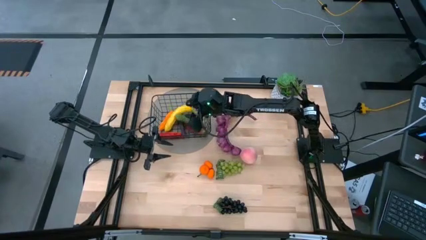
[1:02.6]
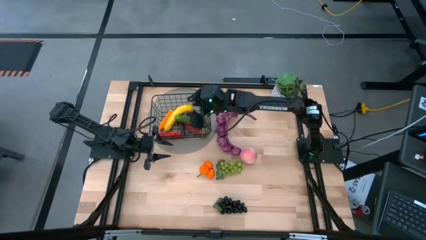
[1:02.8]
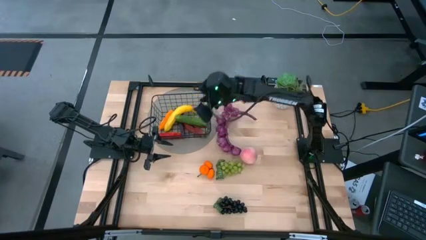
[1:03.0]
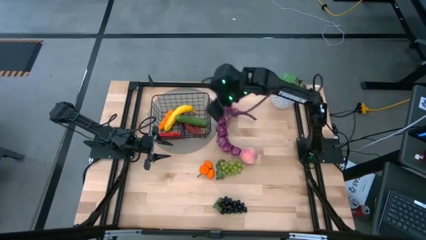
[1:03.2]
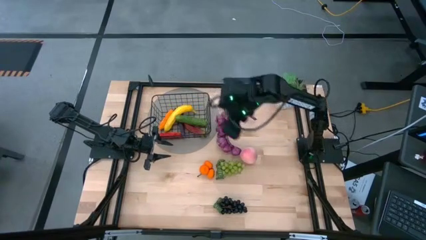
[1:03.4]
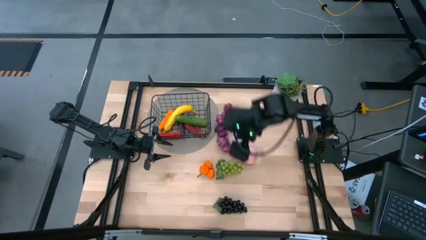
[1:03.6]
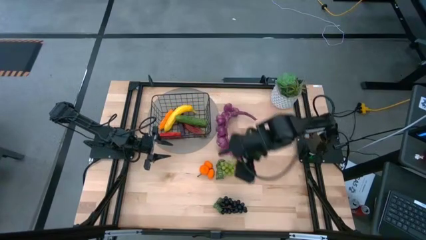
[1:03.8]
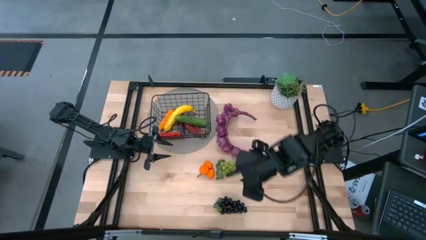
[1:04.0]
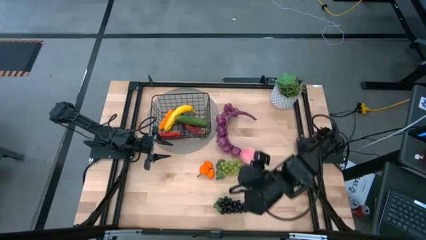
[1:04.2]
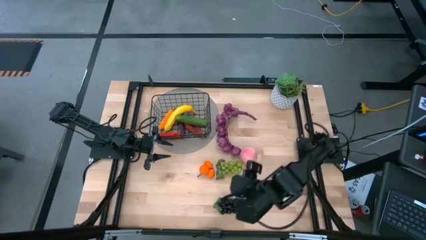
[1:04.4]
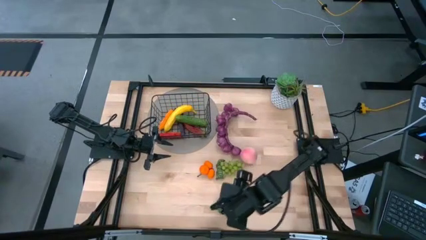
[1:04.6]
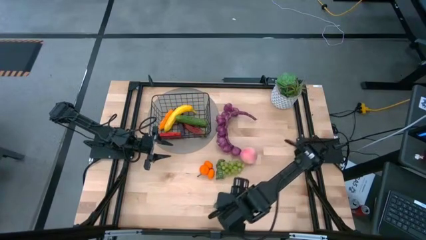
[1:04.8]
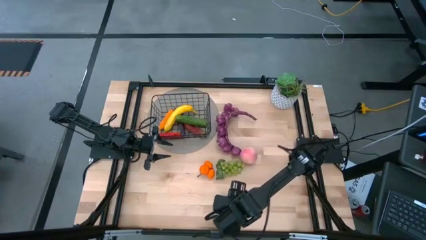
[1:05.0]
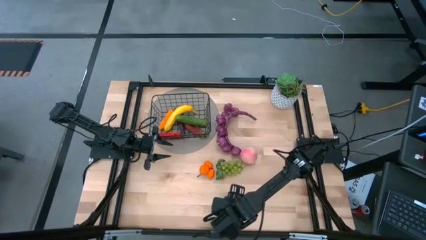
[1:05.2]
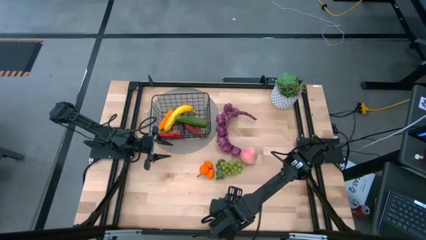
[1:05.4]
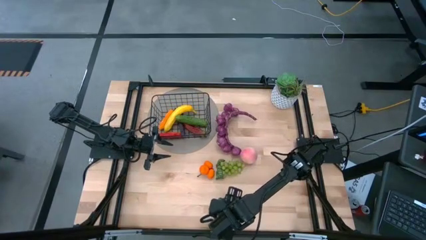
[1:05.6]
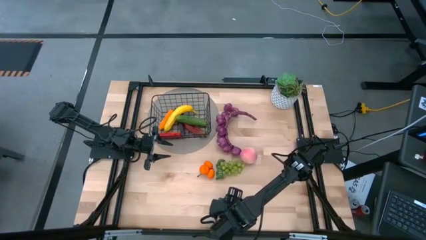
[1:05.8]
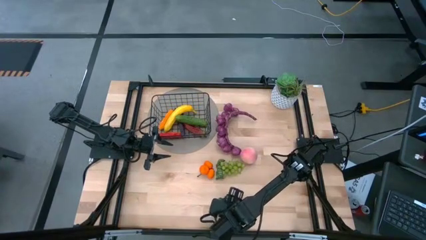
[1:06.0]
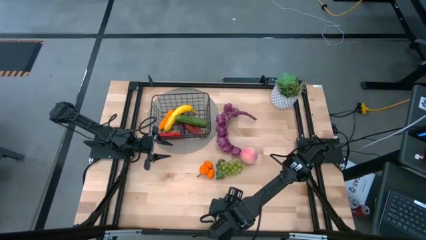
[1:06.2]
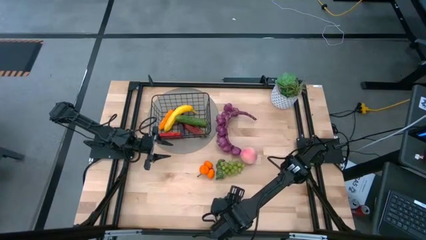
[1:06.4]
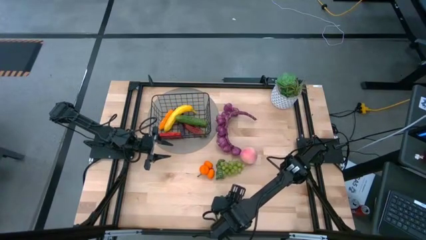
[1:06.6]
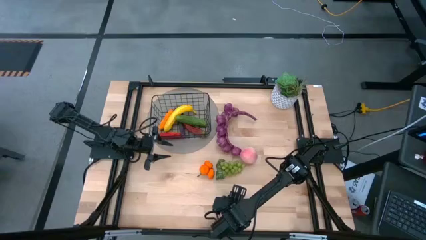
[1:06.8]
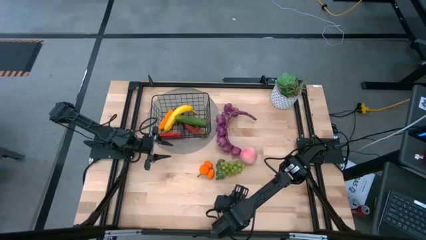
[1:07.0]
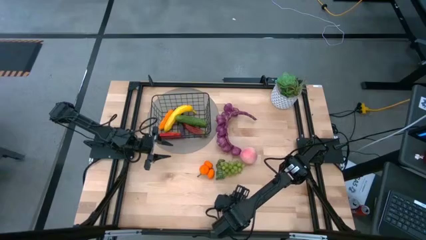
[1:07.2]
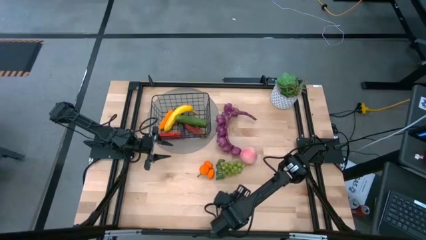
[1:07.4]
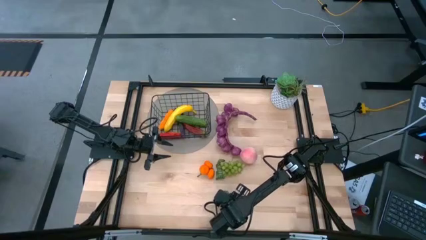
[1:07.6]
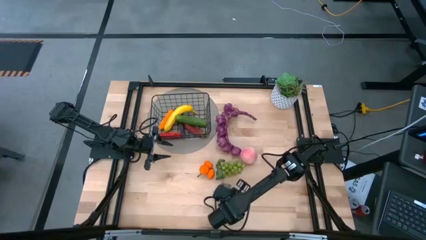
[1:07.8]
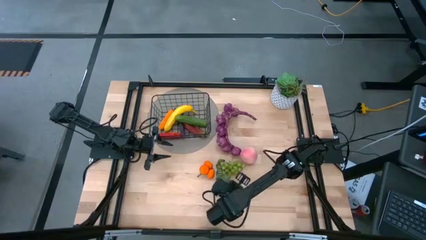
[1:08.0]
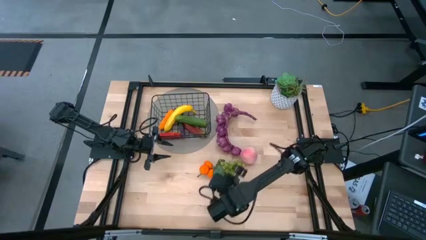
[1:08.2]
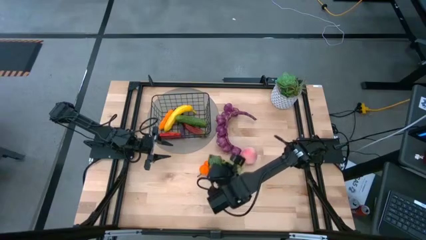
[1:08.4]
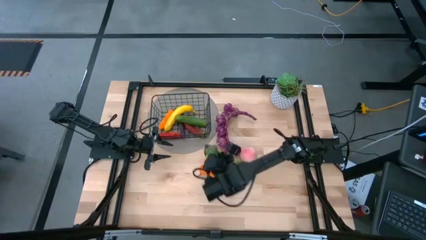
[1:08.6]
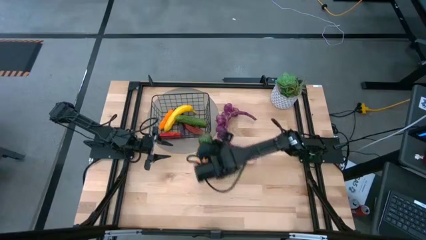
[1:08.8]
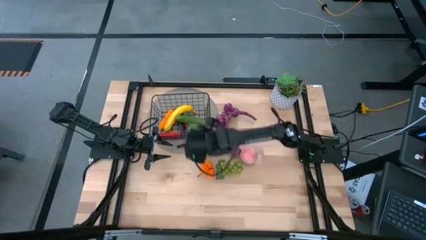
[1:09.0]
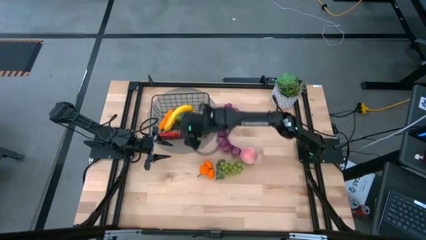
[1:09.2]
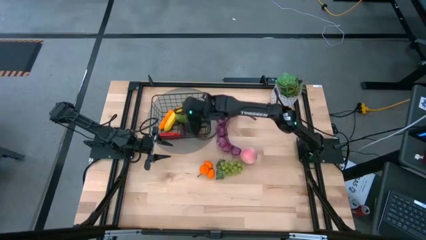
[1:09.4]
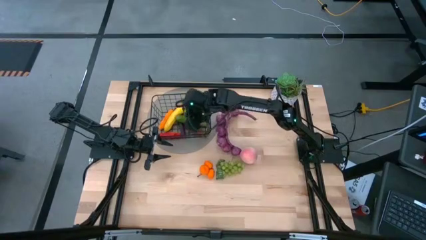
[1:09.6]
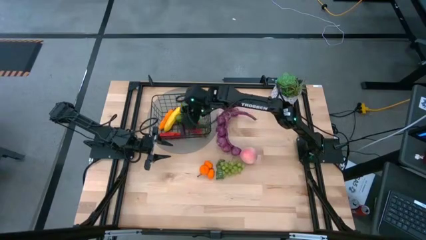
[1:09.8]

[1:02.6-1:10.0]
Task: Build produce basket
Put the black grapes into the wire basket

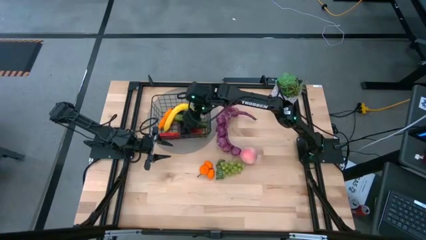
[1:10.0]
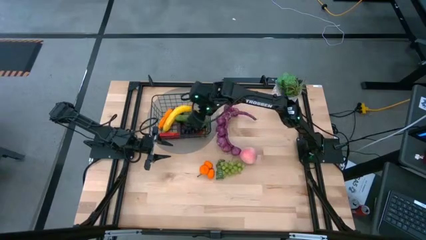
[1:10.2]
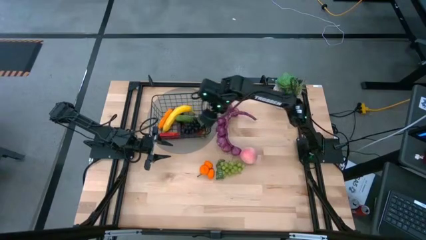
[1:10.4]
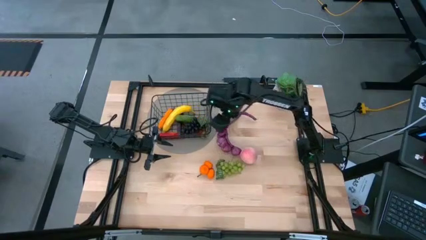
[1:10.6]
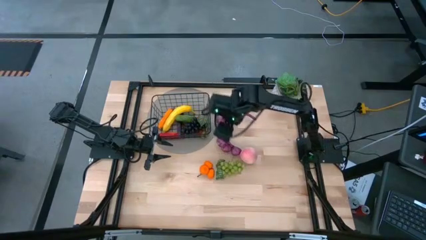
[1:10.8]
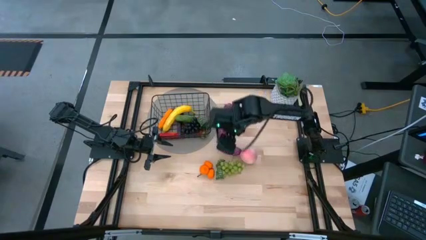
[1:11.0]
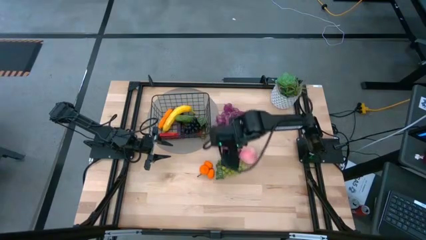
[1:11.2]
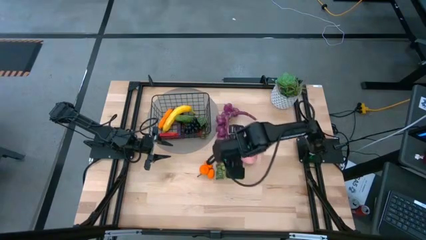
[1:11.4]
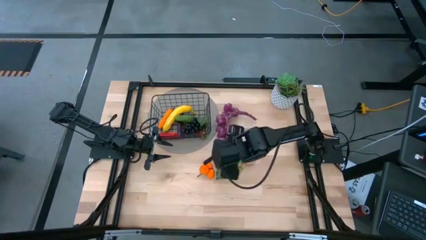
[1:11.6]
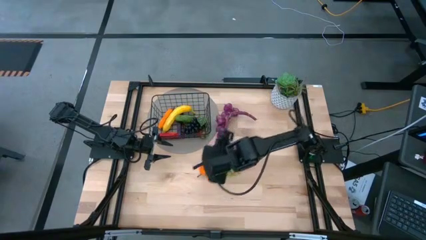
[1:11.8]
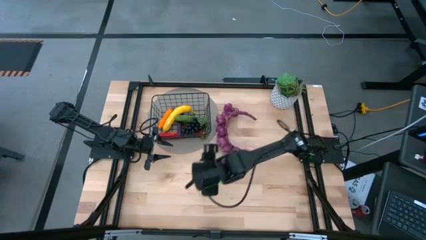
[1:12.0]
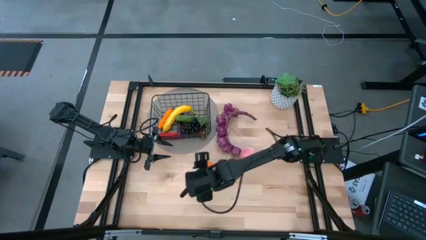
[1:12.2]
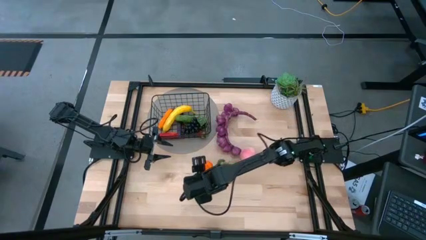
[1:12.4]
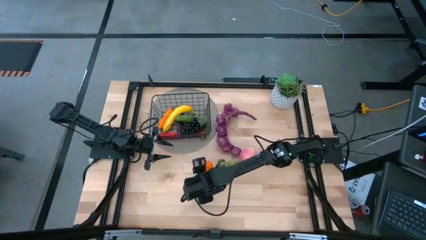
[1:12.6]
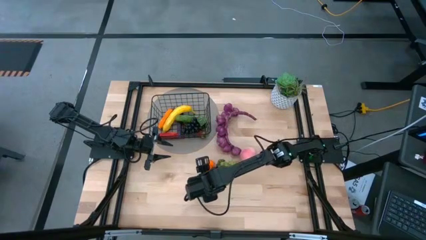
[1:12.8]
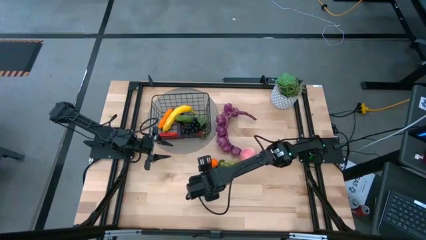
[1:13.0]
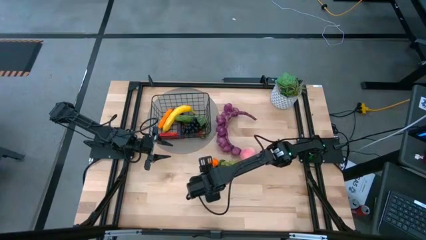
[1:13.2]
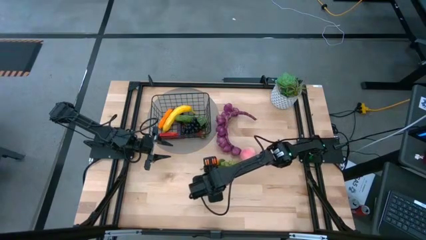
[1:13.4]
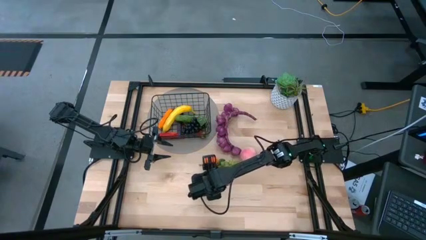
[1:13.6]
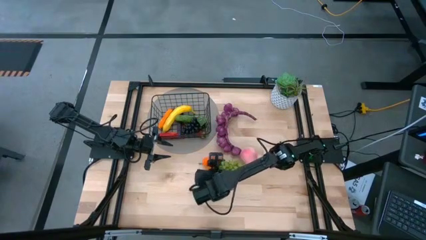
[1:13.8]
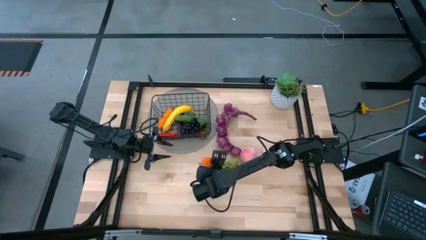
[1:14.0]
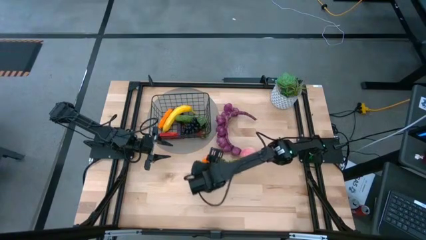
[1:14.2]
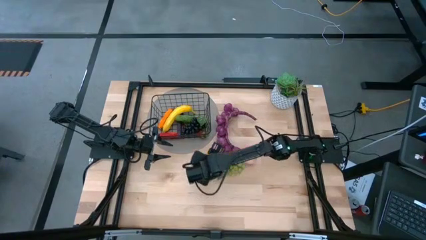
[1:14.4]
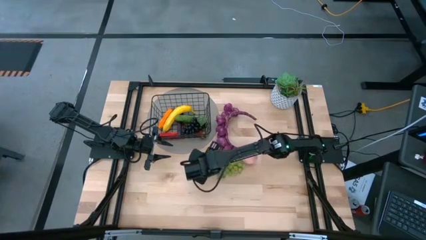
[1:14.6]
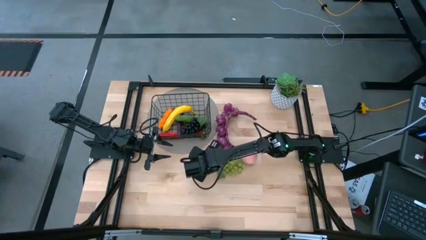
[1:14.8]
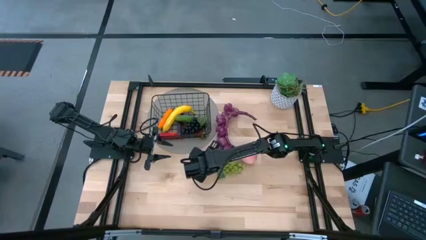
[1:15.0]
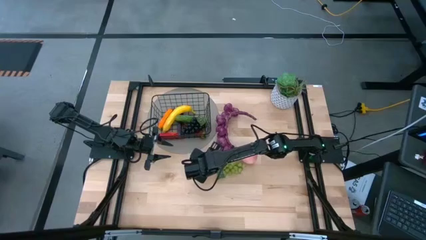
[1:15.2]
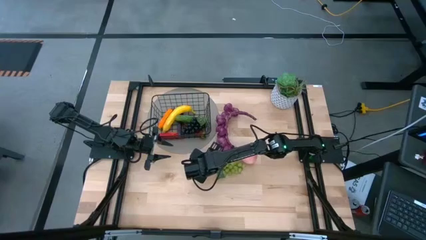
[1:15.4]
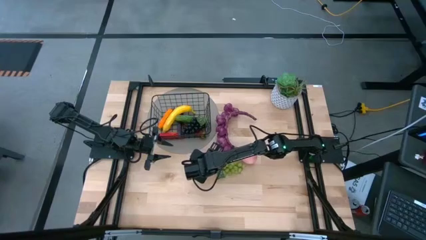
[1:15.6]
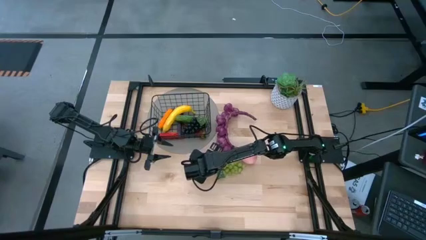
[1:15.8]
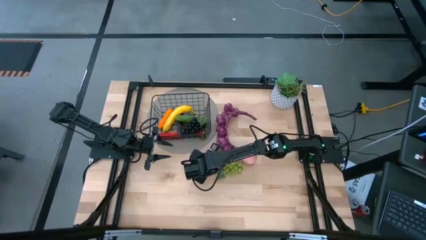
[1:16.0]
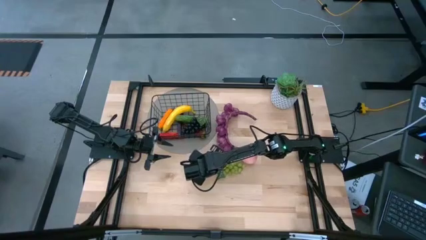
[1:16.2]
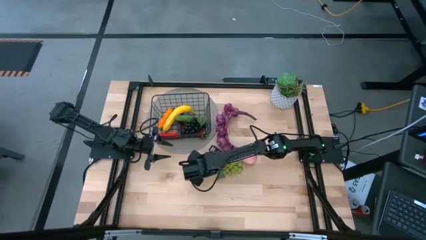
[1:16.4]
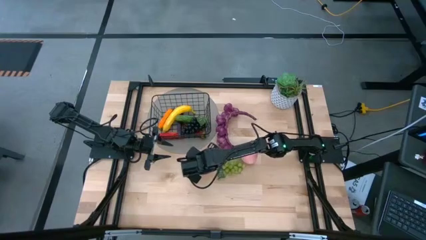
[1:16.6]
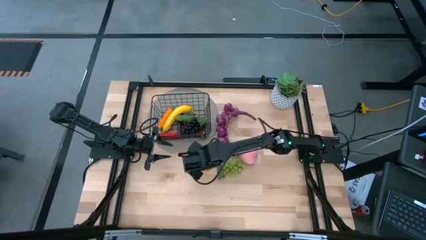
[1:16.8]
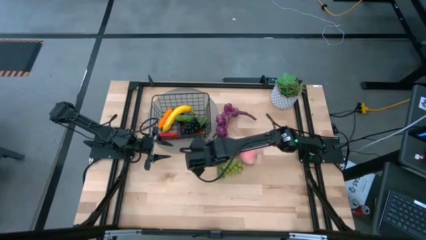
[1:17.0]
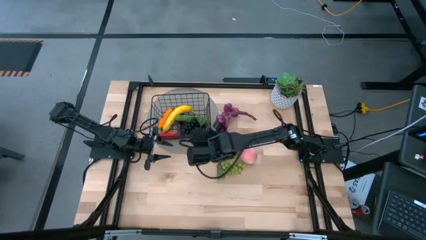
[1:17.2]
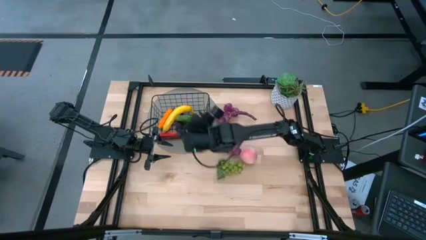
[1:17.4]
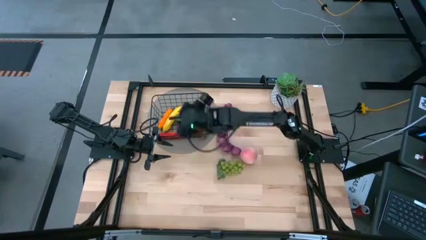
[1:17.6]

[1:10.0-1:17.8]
Put the oranges into the wire basket

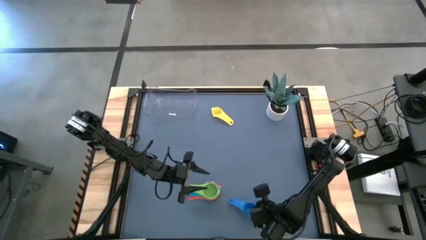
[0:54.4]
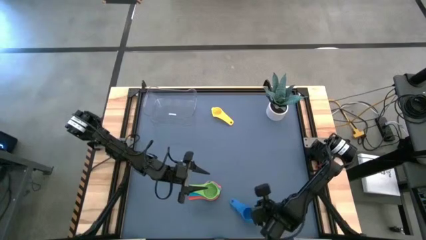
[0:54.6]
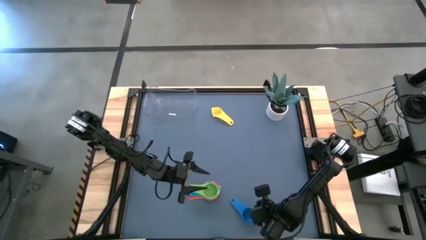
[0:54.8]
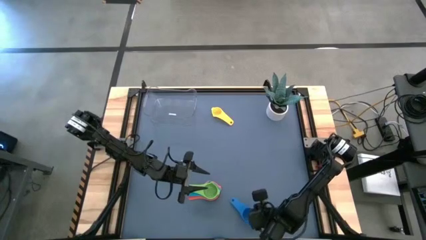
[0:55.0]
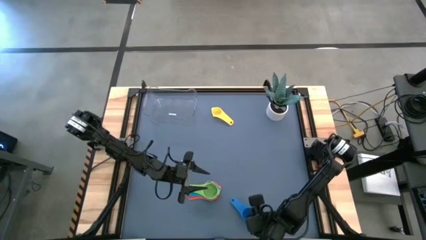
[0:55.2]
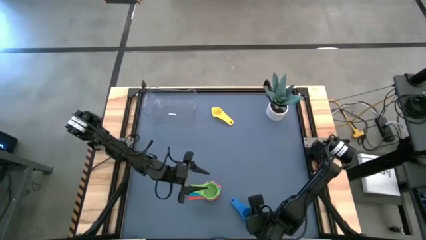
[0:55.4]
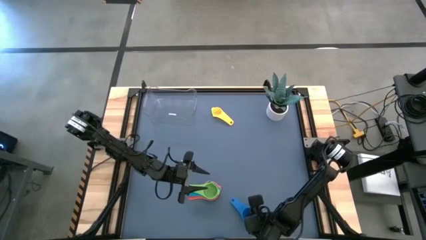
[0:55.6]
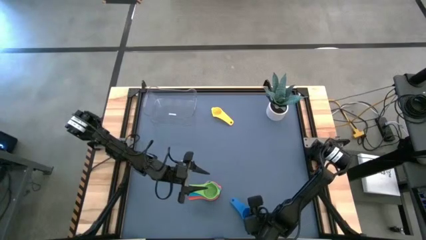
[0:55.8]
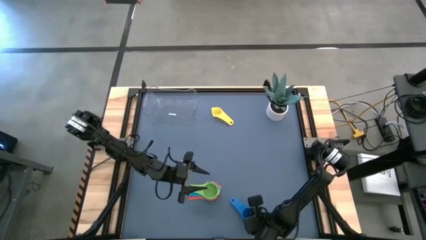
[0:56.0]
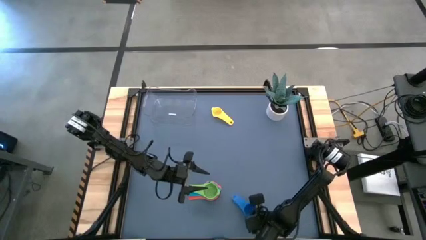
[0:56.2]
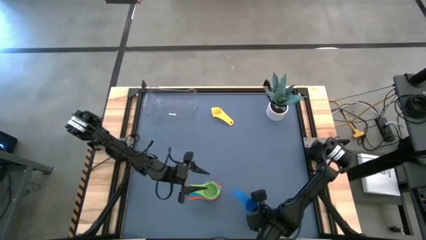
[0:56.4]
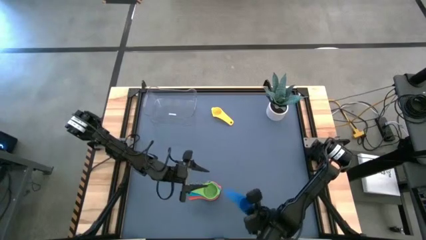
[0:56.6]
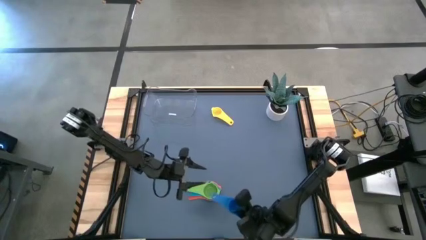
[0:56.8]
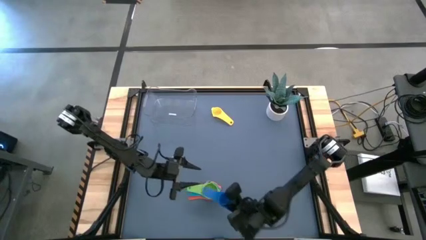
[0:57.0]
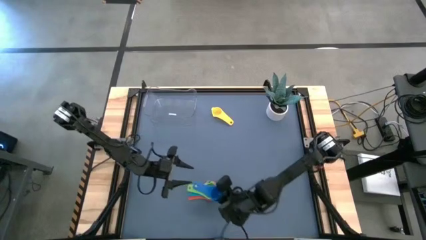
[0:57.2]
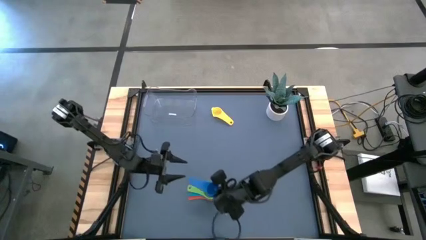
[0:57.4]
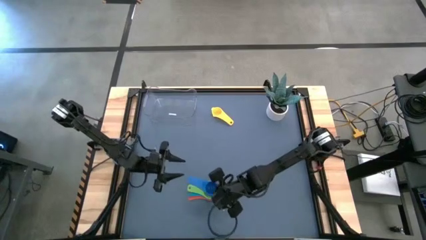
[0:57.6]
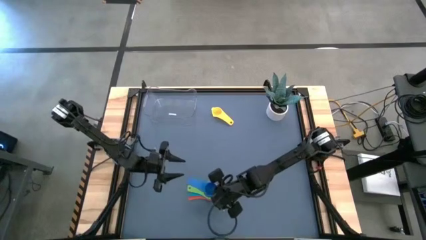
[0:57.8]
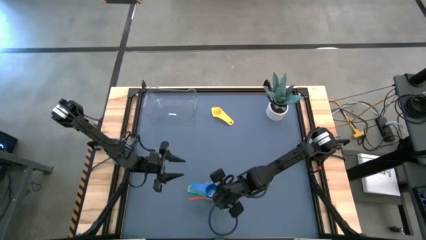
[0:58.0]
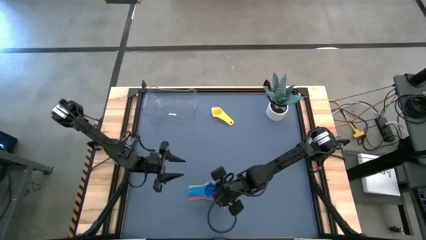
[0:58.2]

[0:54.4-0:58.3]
Task: Nest measuring cups in basket
Stack the blue measuring cup on top of the green measuring cup
